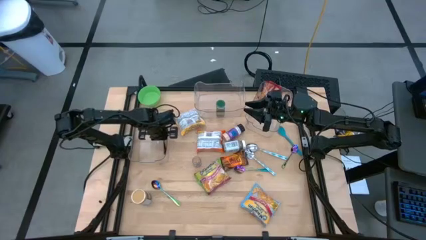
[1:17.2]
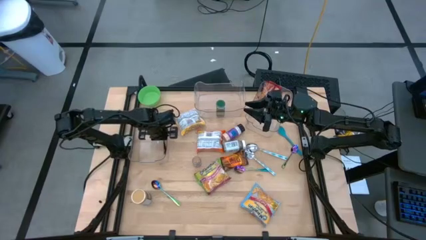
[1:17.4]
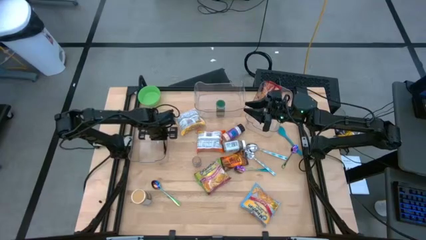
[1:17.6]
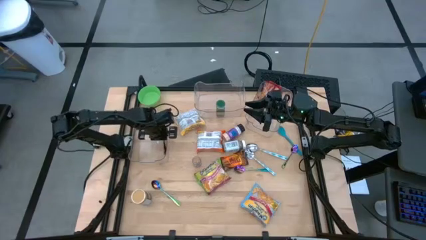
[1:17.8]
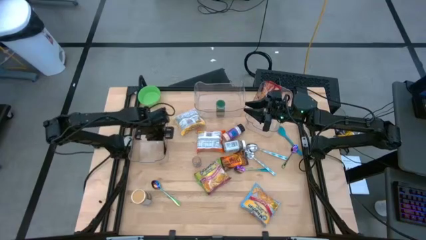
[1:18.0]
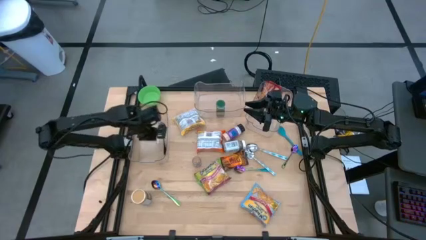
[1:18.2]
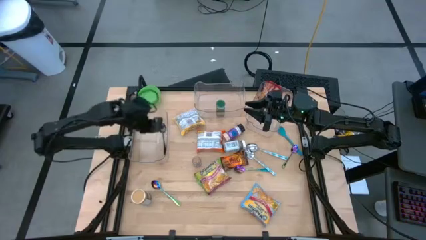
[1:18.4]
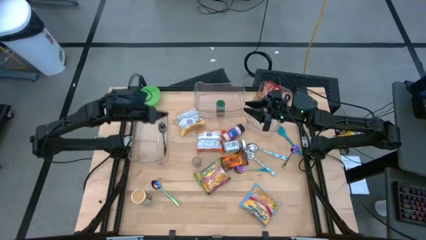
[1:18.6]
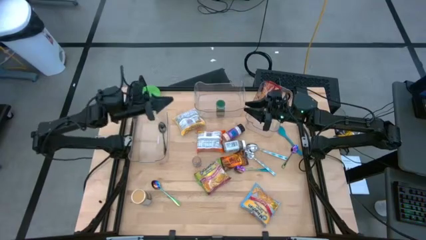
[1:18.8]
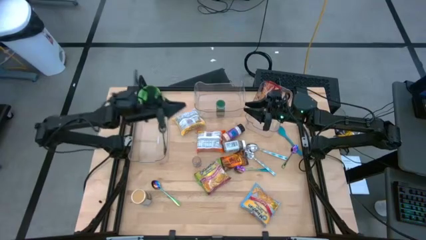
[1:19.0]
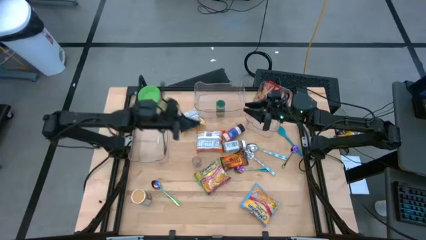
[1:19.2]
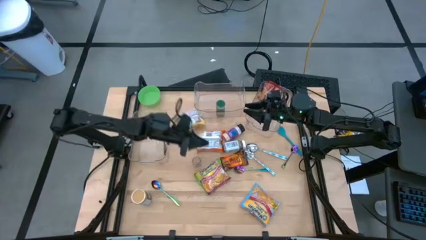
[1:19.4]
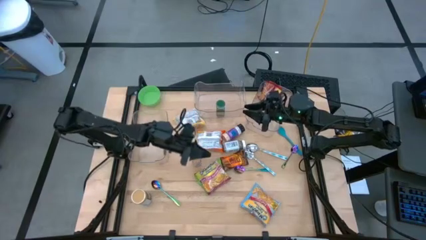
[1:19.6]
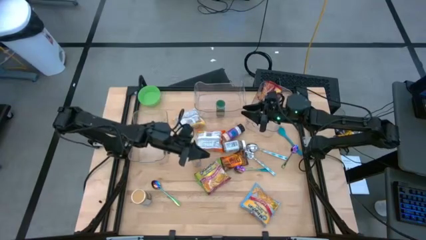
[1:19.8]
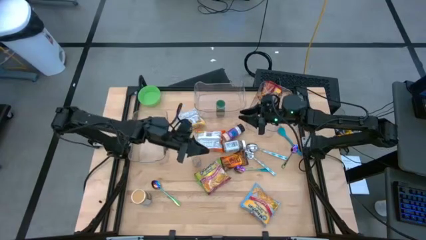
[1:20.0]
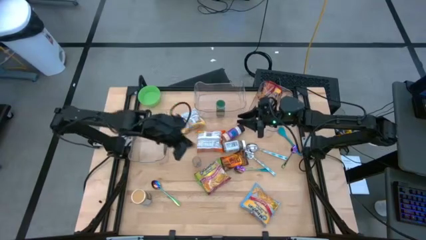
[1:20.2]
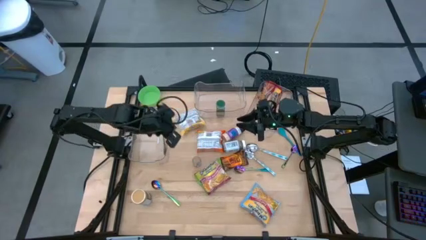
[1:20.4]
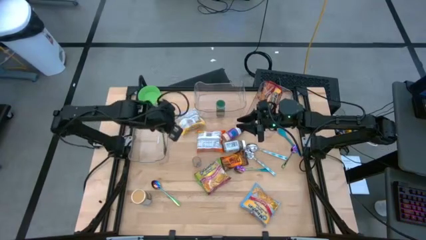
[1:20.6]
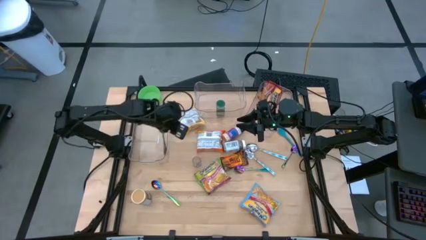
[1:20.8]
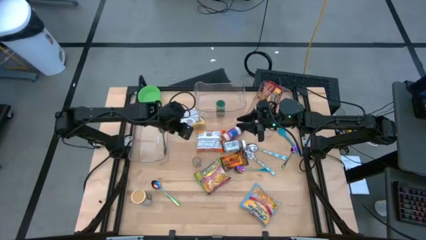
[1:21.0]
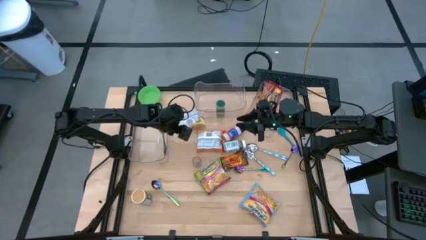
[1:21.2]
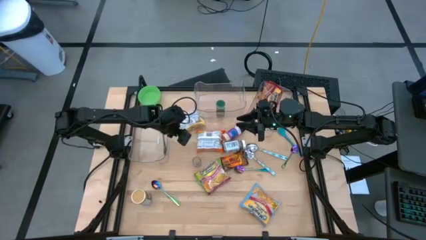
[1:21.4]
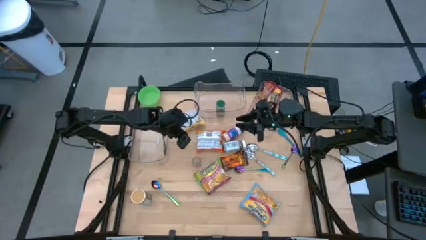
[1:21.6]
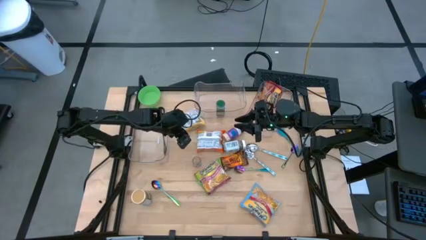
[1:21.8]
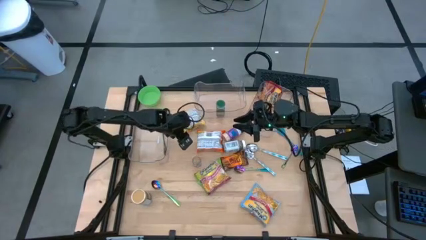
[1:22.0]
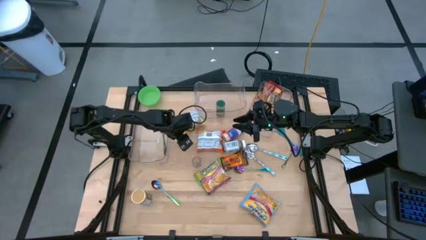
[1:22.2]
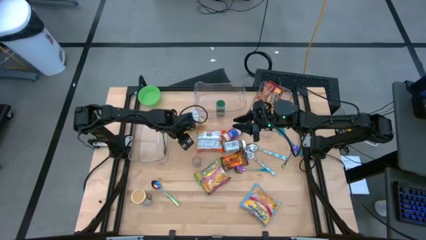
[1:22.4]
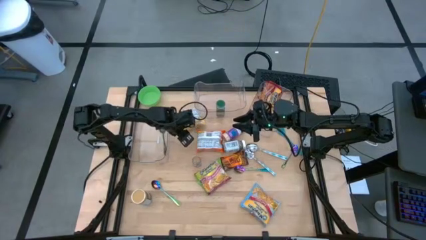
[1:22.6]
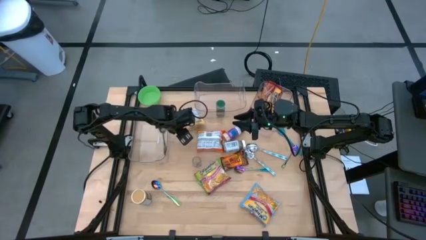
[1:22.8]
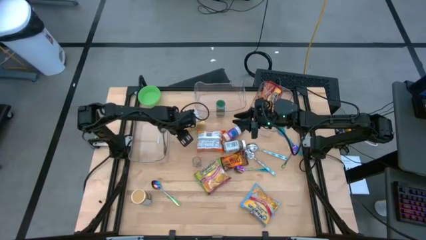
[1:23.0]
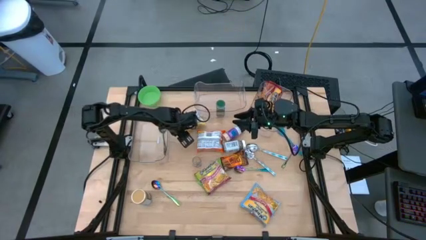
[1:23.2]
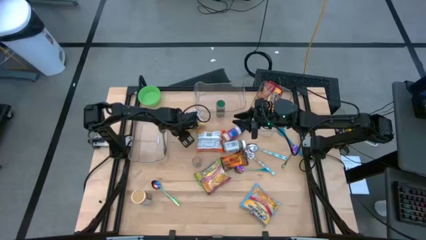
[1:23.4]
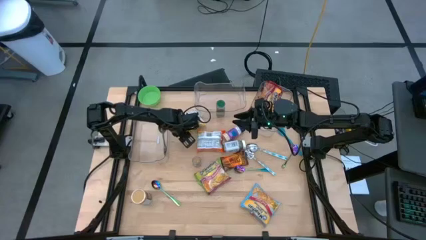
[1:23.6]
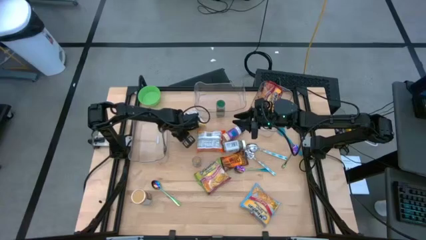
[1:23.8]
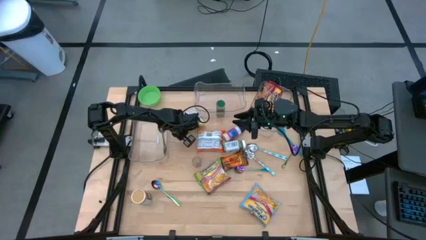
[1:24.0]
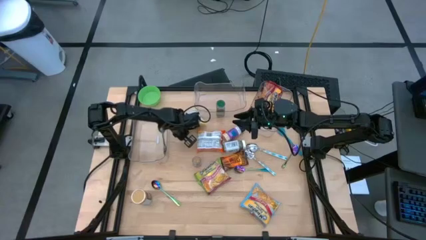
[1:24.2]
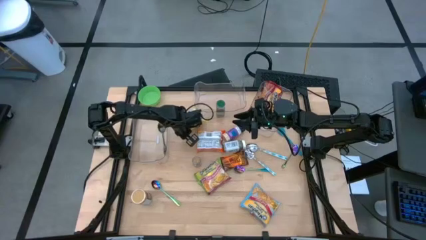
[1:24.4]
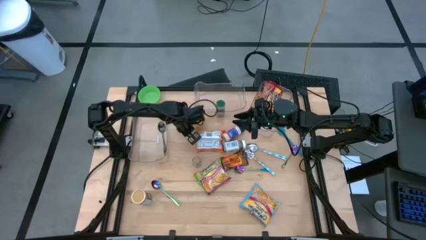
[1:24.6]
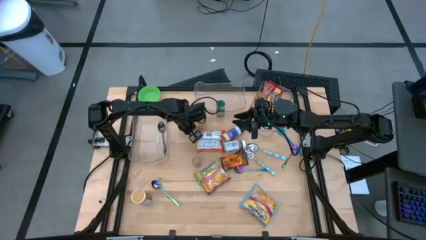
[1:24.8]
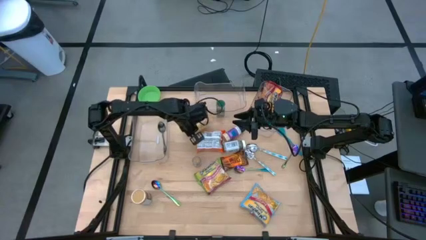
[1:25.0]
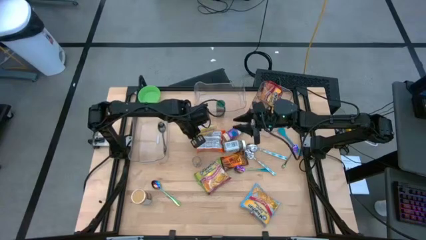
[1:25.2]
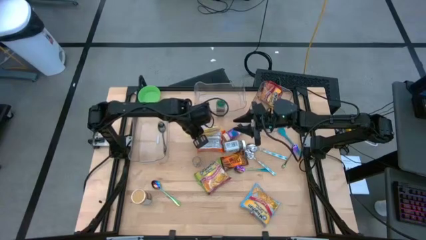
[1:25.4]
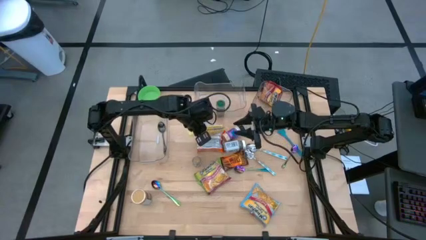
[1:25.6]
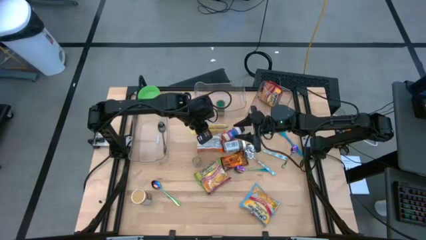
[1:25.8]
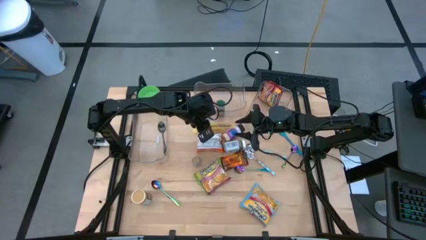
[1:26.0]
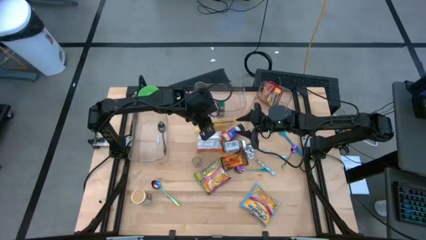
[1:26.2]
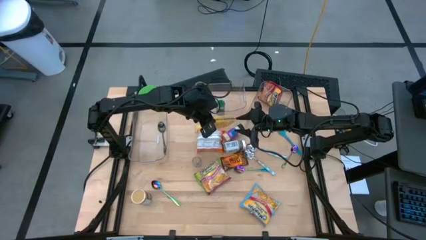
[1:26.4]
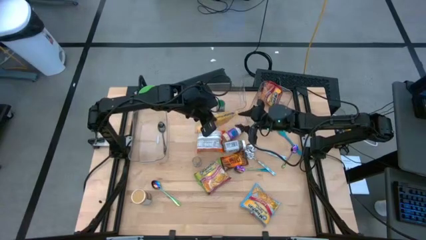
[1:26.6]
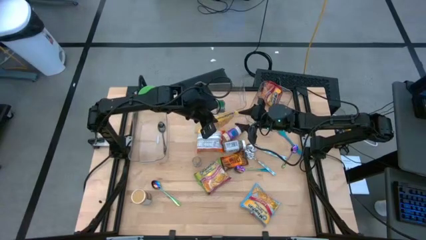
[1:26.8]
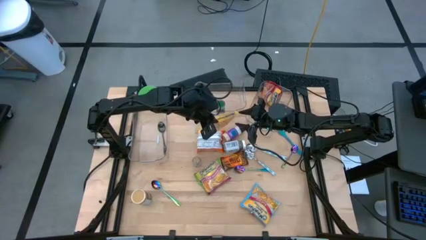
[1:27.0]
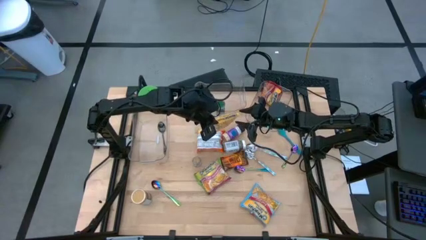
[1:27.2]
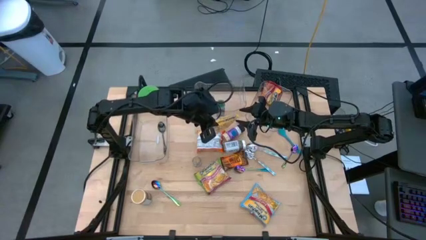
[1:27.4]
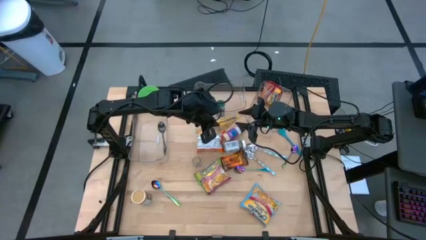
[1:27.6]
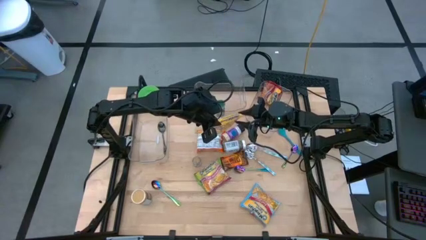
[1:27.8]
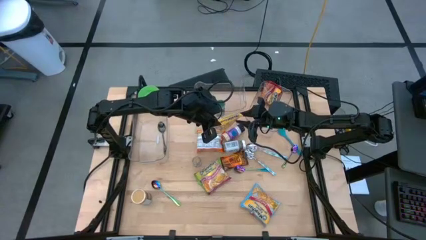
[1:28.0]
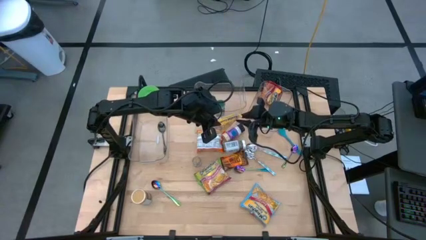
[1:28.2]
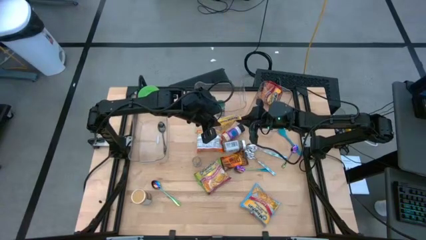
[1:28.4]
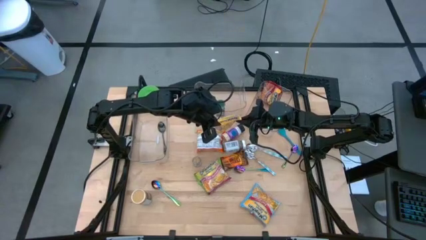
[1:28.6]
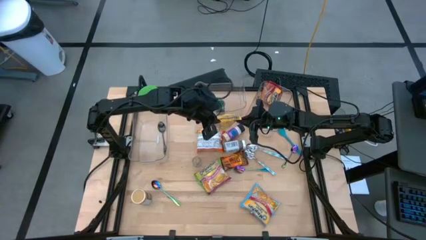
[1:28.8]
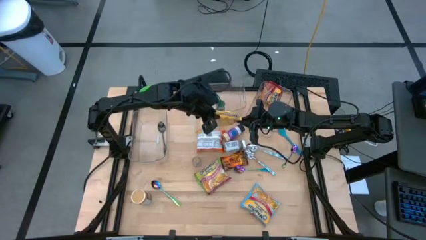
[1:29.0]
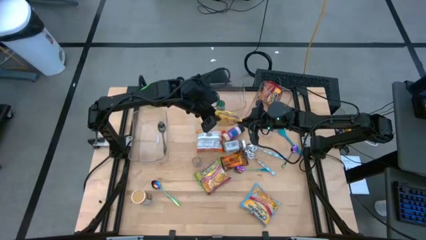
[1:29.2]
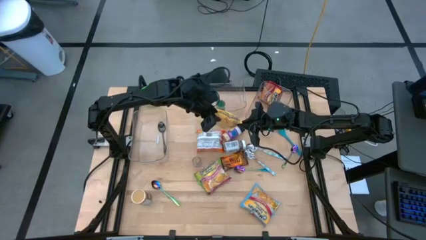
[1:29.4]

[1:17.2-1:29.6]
Task: Pick & Place Food Item
Put the yellow noodle pack into the right transparent bin

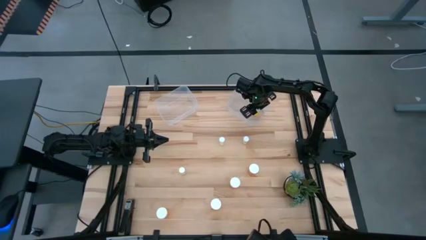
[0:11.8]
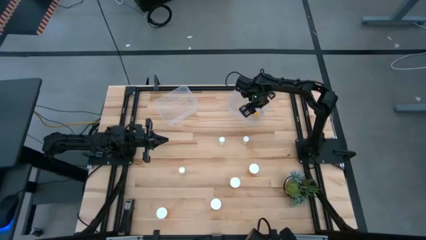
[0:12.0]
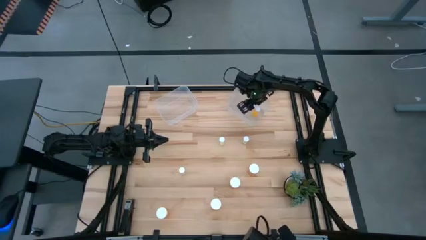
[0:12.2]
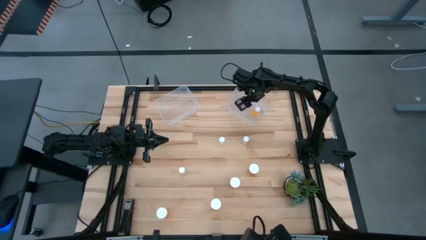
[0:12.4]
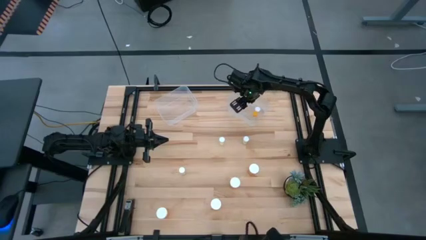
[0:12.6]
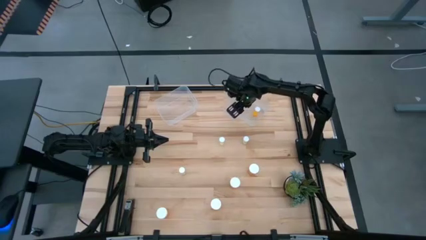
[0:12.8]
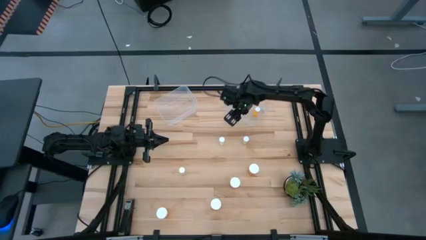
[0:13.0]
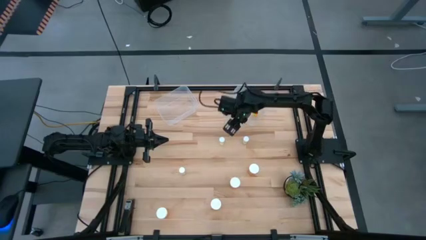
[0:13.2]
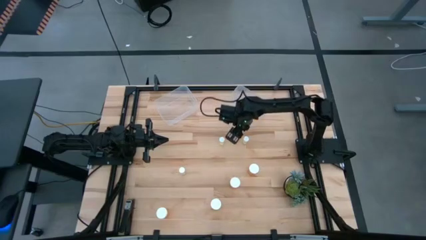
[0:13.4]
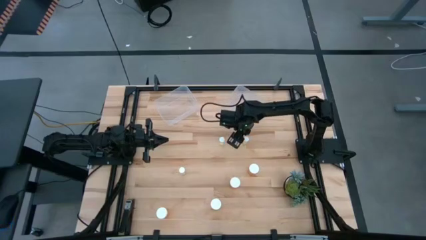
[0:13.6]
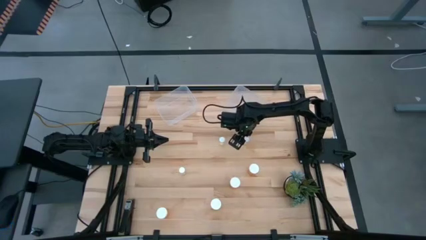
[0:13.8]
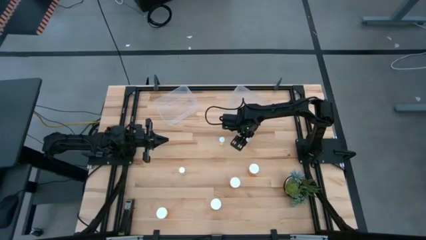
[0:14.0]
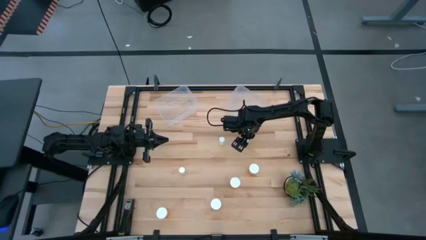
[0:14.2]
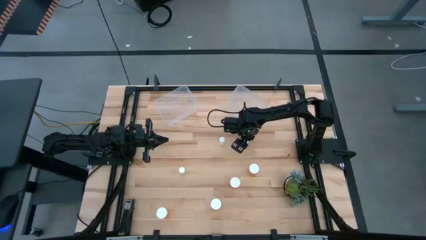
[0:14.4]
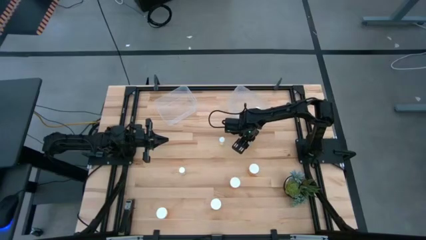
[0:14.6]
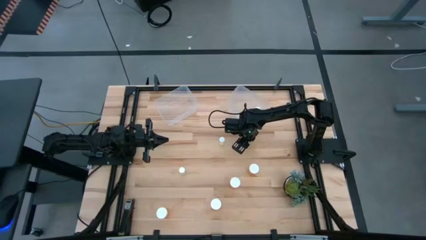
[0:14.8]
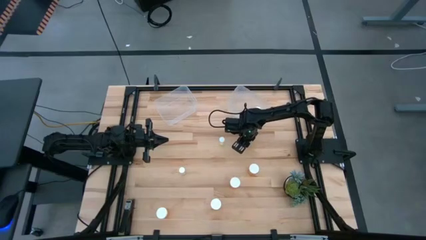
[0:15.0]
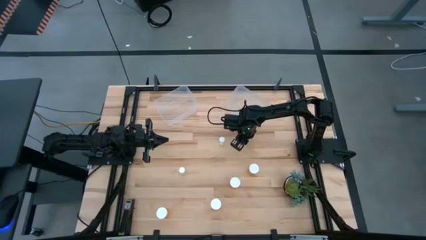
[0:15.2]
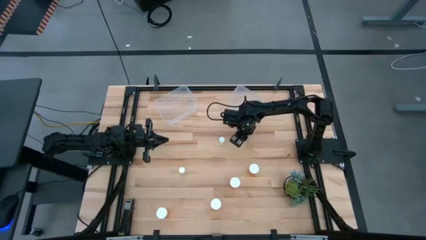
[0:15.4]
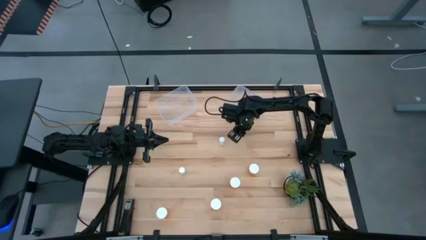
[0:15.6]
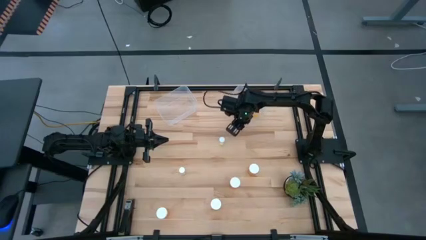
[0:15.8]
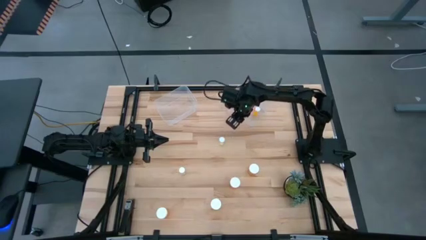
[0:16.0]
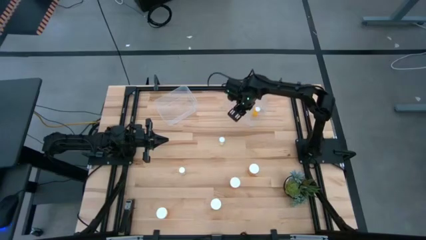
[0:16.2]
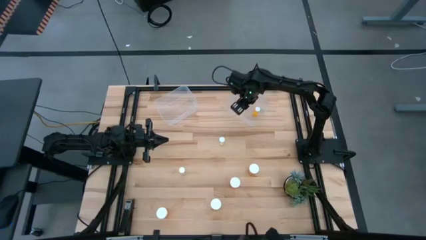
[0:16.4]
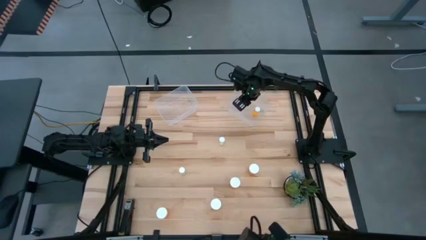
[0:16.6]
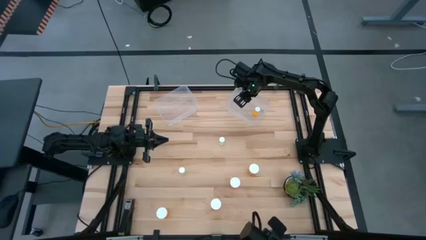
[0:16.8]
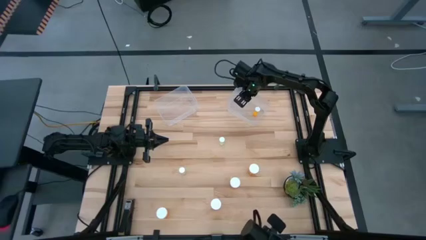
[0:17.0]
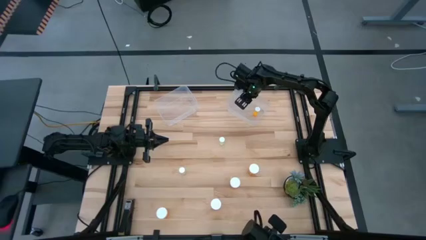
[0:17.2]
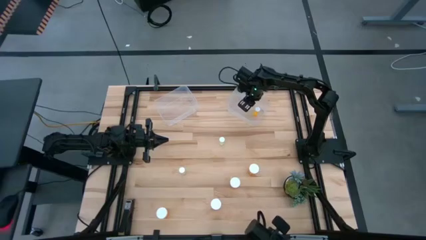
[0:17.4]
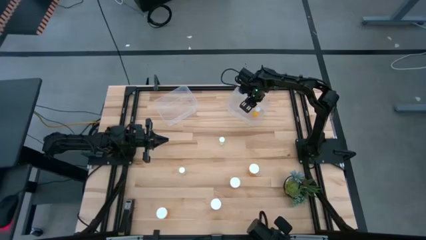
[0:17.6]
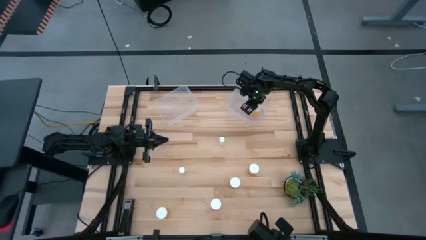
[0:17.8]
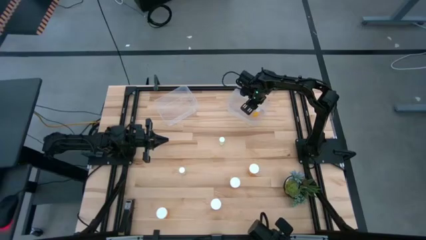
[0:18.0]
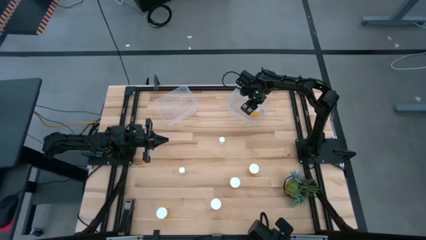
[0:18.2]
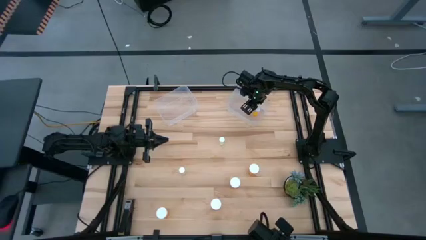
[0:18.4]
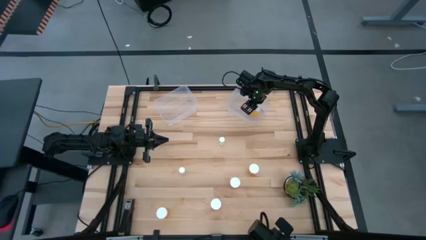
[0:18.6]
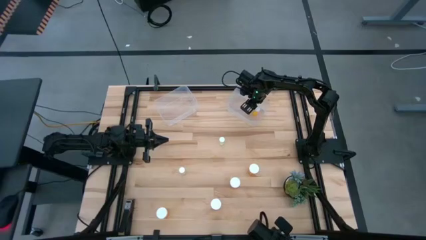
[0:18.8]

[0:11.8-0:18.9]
Task: Pick and place medicine bottles into bin by pill shape (circle, oval)
Put the small yellow pill bottle into the right transparent bin
